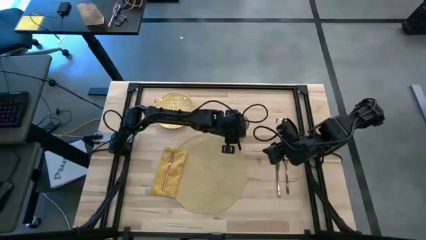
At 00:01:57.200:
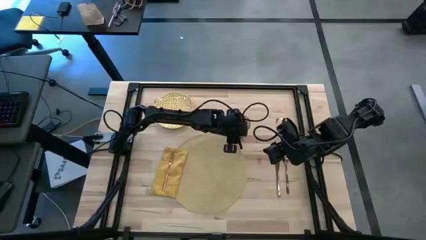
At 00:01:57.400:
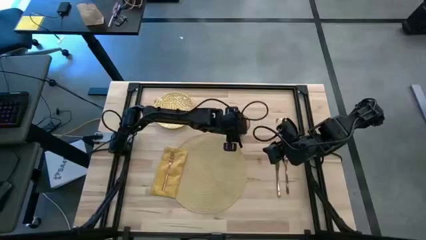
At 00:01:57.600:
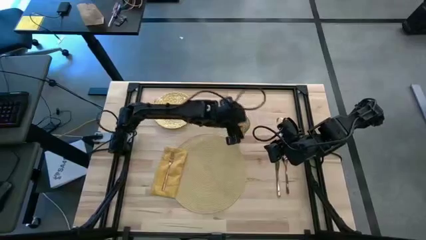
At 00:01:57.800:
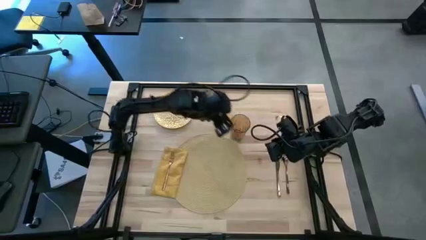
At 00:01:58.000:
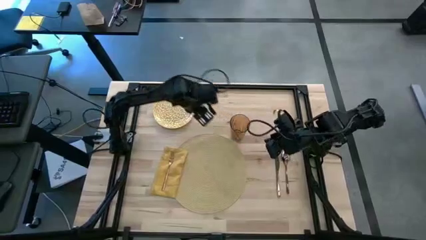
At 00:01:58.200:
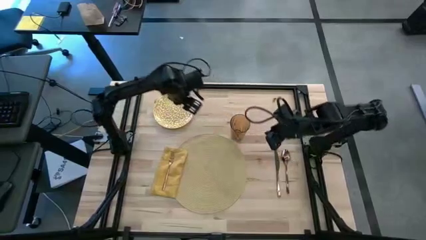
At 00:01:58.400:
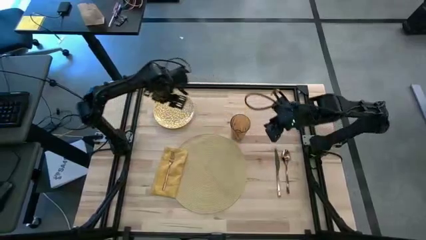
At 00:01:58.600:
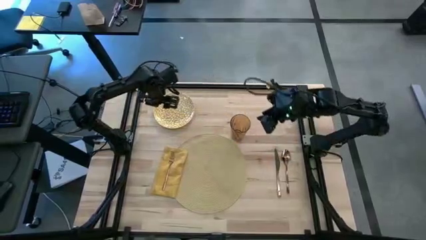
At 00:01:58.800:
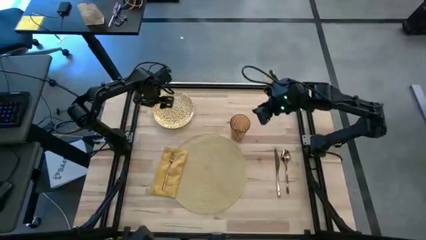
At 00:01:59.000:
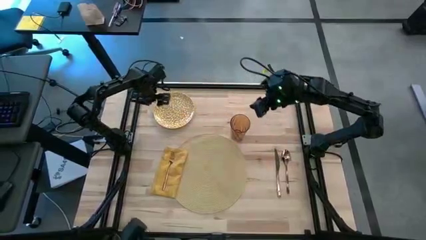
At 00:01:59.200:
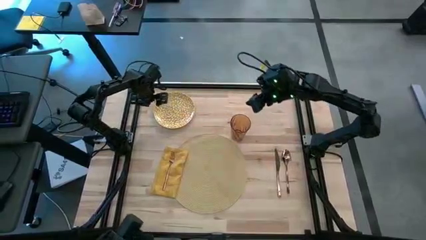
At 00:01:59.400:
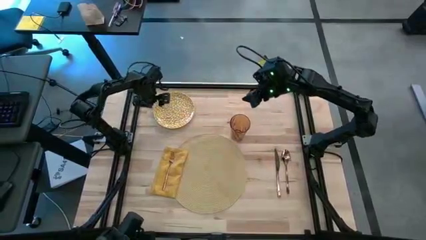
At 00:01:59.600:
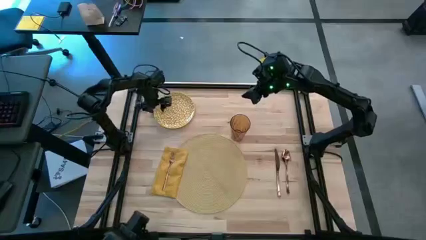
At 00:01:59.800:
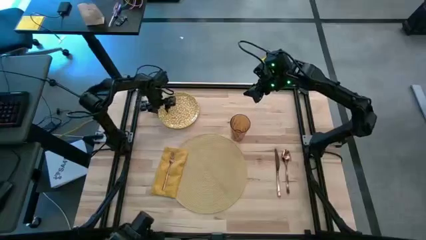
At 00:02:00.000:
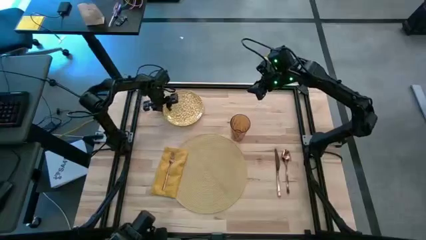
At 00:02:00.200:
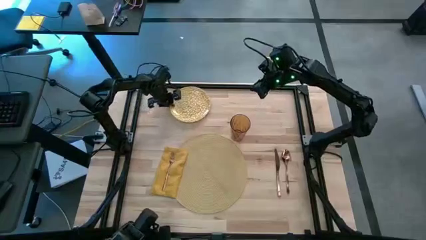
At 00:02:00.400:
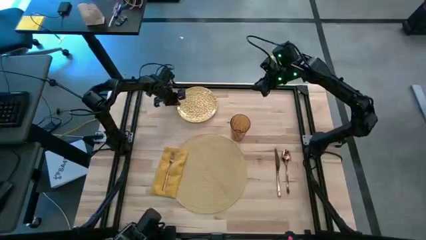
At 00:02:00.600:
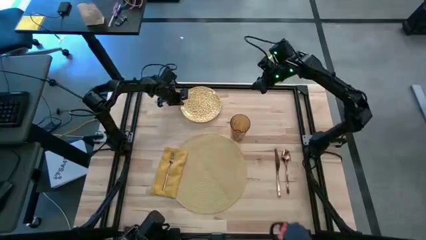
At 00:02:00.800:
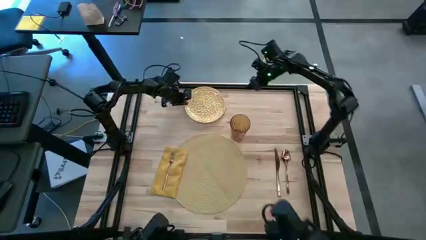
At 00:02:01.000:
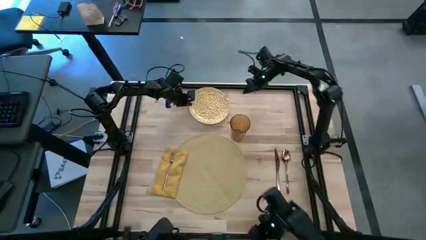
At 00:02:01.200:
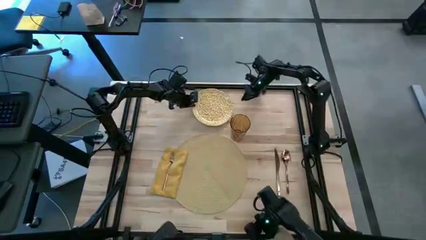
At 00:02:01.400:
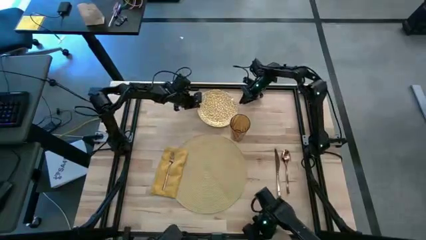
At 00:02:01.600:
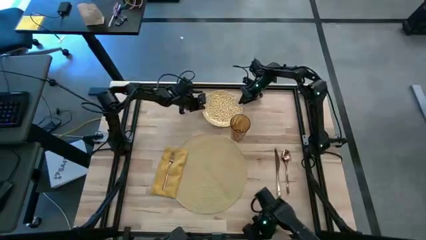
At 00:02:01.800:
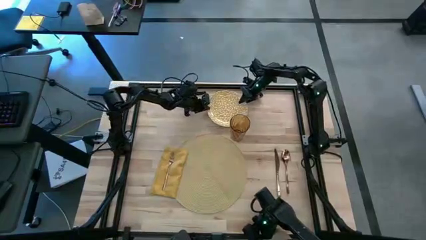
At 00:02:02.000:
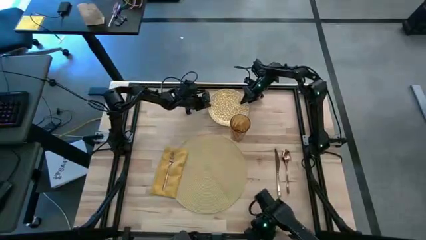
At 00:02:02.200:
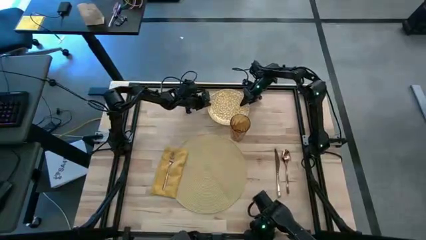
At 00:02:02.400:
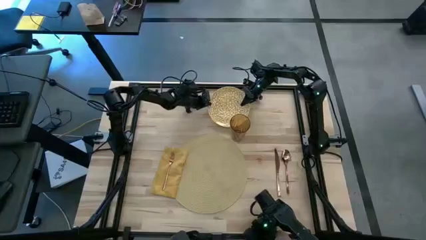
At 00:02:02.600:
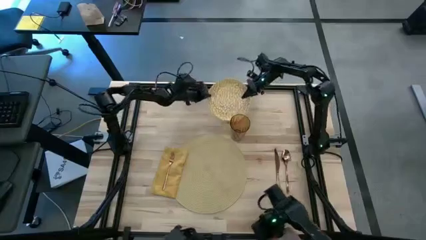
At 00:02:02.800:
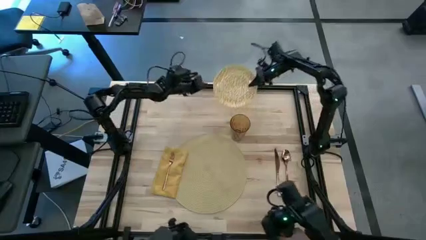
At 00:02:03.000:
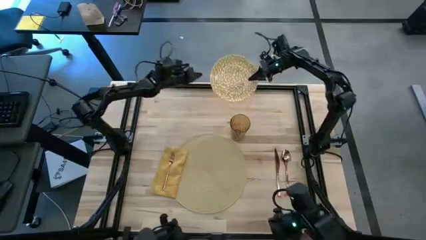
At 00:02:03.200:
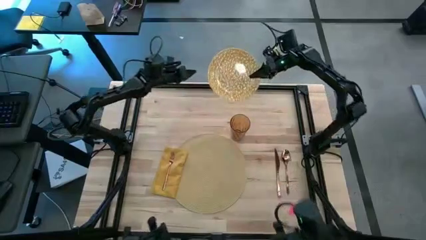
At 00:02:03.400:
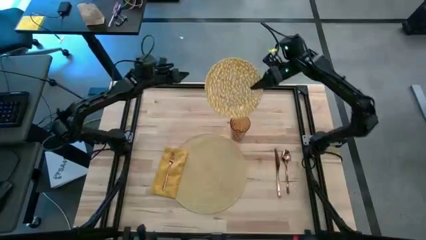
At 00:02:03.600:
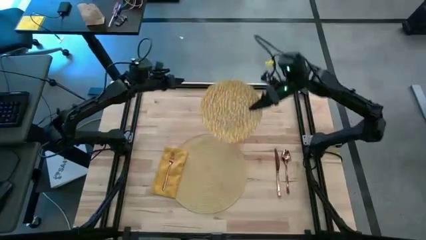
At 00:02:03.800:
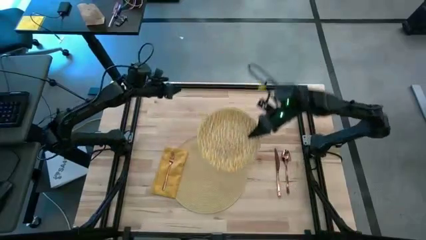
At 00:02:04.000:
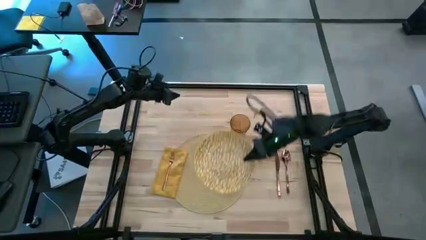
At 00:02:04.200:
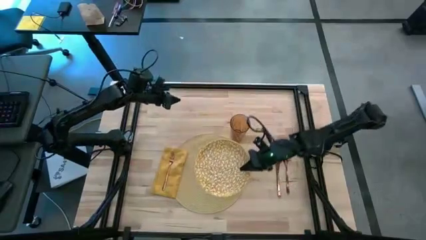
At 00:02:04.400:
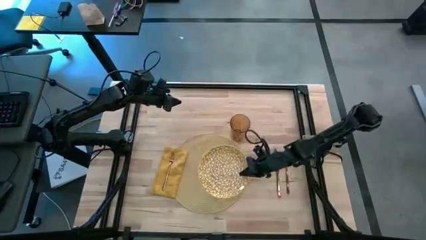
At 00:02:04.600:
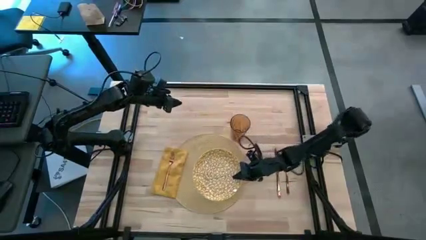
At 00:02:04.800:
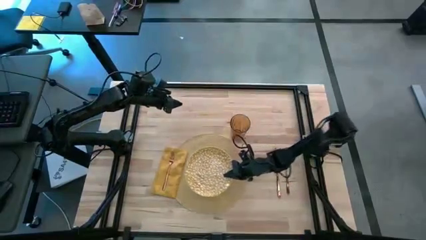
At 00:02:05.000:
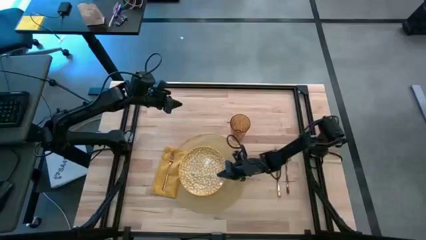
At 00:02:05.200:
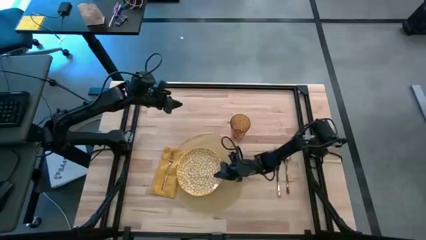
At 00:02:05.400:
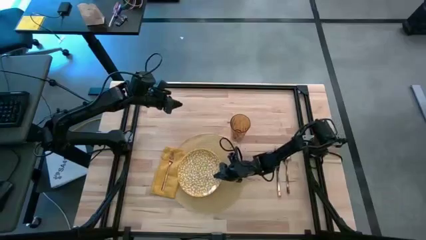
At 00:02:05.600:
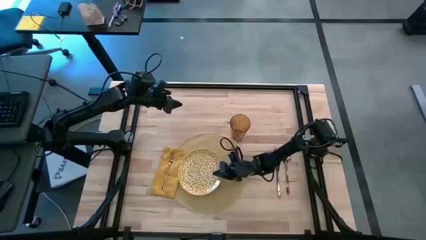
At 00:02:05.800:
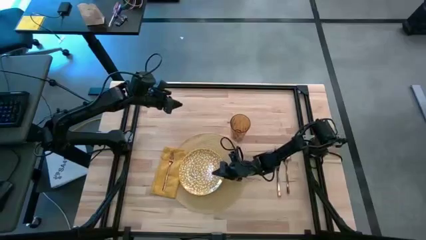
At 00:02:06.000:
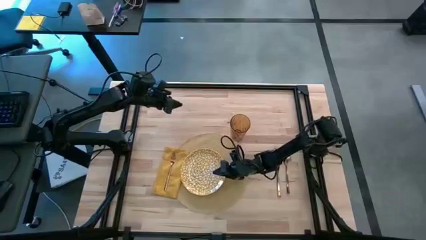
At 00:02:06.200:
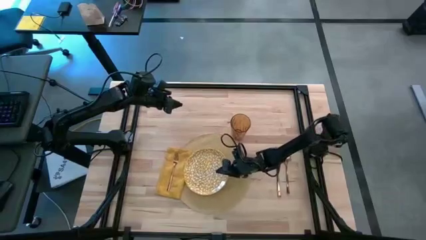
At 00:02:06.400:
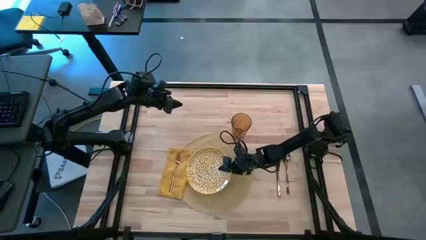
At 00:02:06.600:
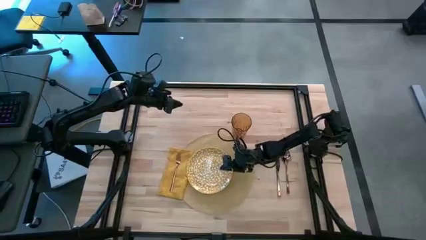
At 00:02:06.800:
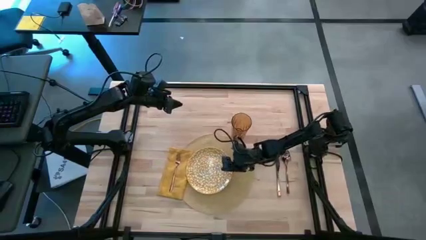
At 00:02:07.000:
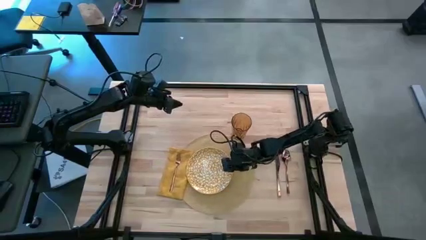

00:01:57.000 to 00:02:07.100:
Task: Set table place
Put the yellow plate on the brown place mat to the left of the yellow table napkin

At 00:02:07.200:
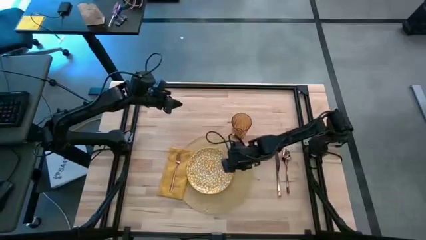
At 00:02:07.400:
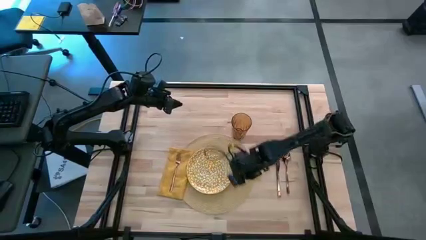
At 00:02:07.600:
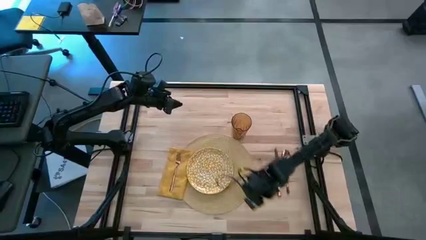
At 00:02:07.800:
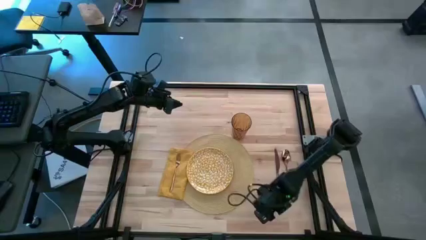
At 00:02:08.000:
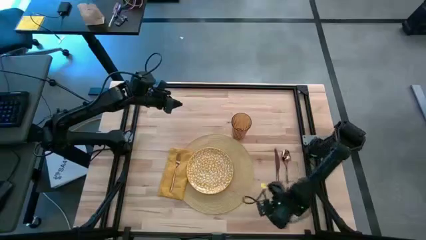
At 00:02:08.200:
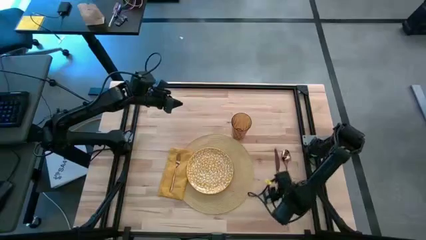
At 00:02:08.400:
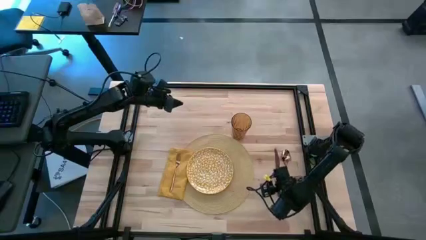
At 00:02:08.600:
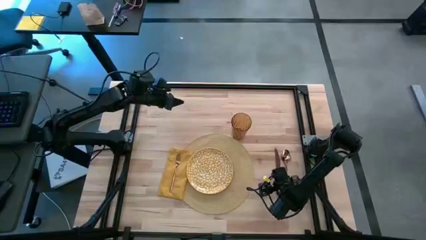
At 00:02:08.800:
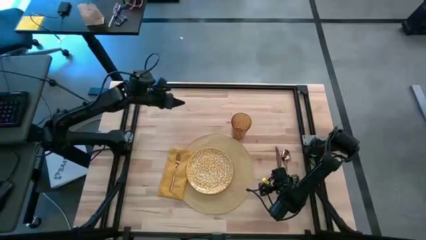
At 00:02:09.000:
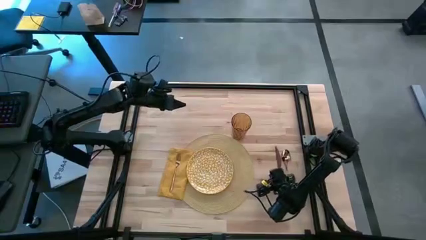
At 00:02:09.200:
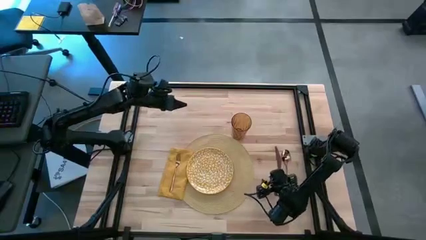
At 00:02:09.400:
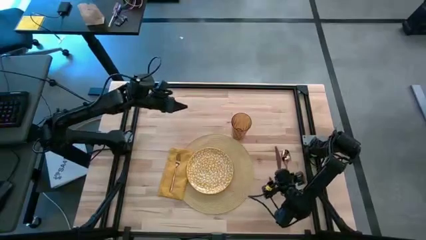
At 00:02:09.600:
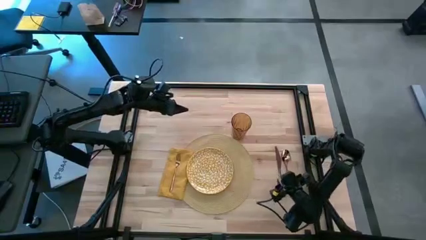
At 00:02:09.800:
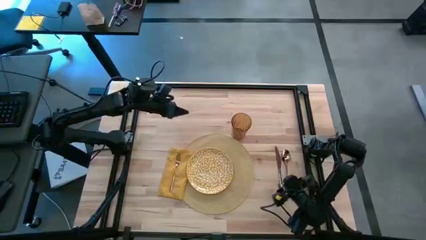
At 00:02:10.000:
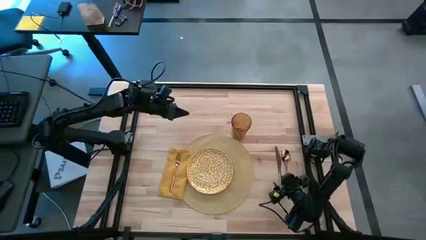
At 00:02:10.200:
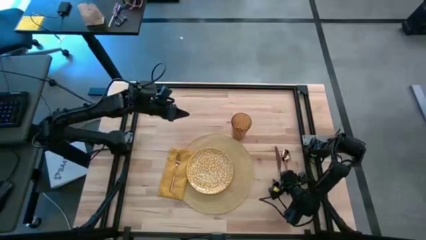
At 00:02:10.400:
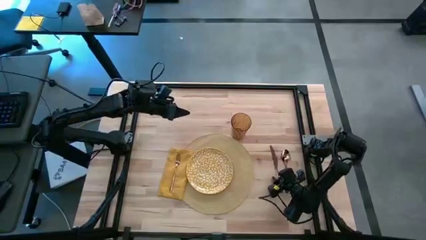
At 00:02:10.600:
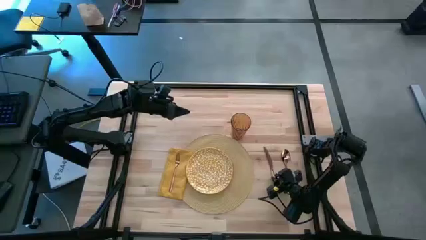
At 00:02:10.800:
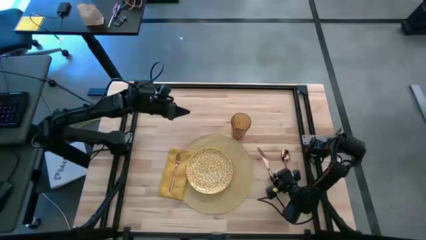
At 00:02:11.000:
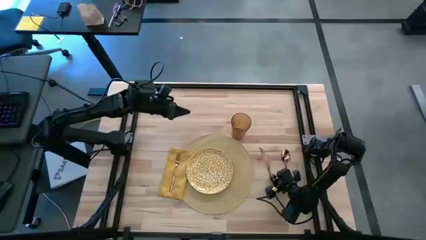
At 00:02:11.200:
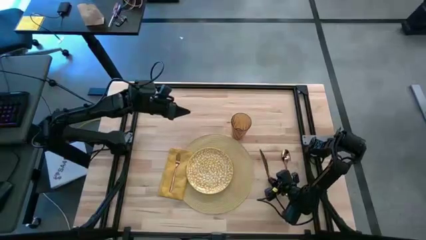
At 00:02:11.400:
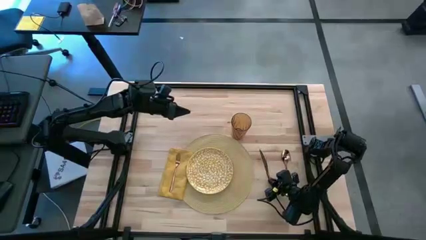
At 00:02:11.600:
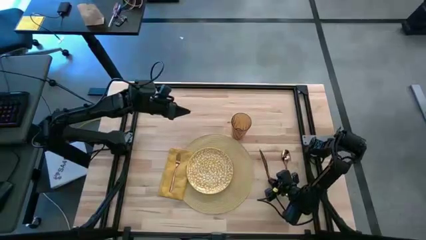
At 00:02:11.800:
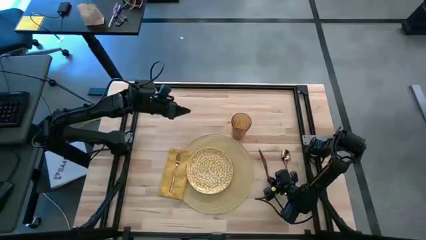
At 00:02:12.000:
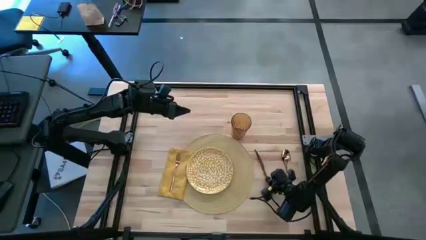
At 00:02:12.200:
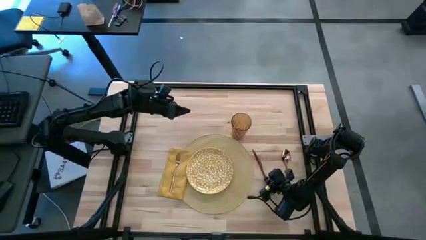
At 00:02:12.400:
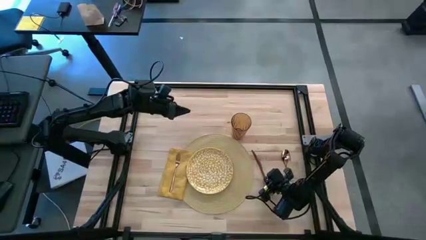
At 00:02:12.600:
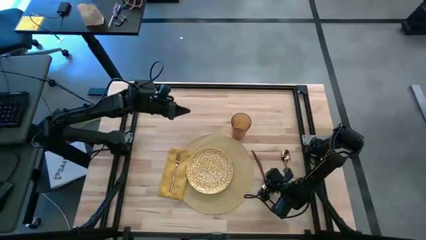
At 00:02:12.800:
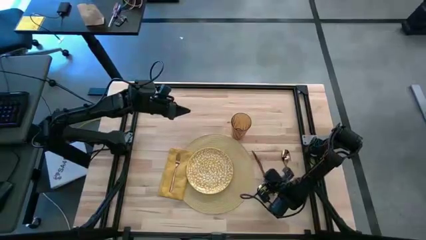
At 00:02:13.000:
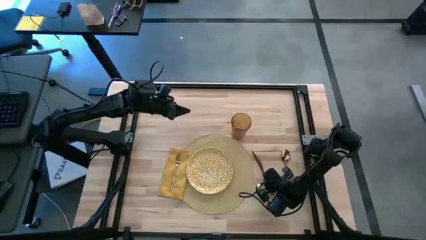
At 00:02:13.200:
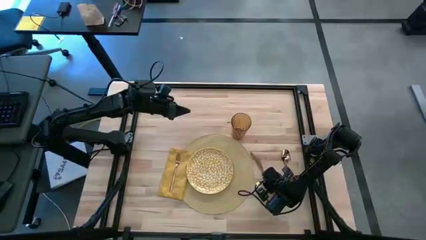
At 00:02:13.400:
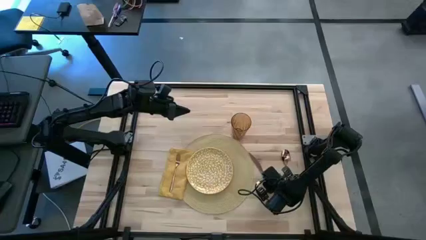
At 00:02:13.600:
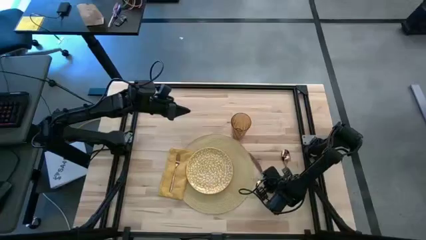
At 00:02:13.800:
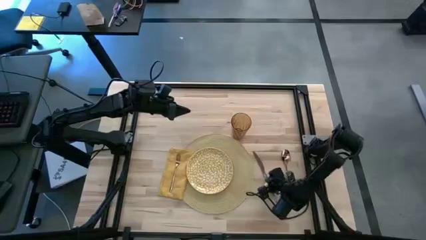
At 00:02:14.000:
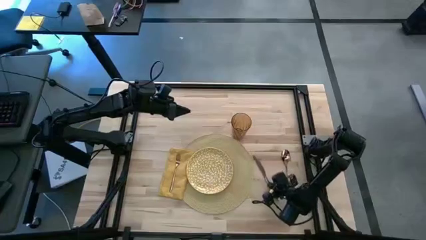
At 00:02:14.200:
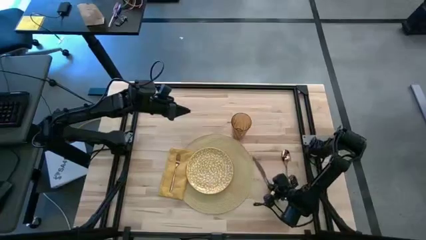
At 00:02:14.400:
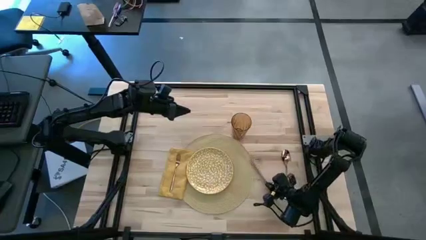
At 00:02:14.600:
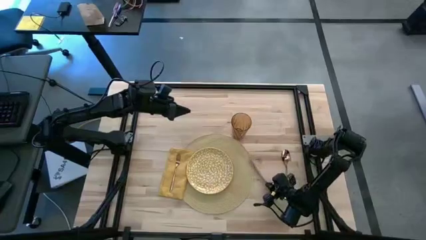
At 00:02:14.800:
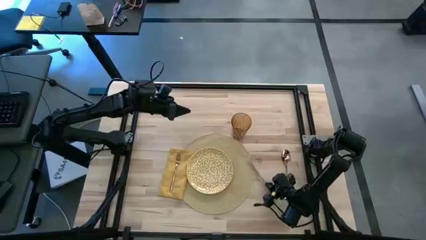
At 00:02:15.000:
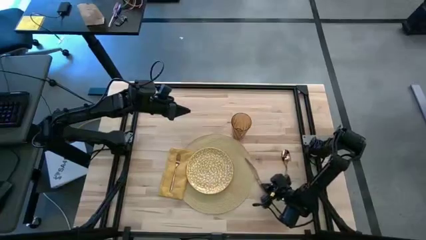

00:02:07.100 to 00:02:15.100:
Put the bronze knife on the brown placemat to the right of the yellow plate
